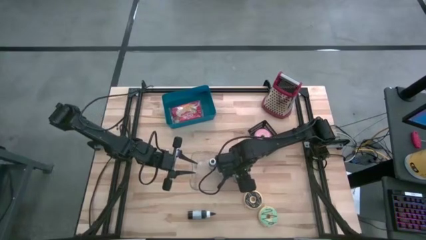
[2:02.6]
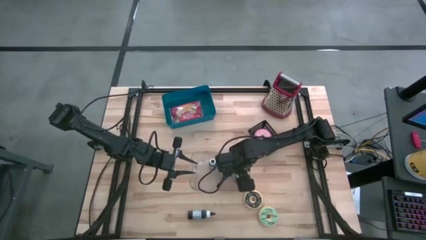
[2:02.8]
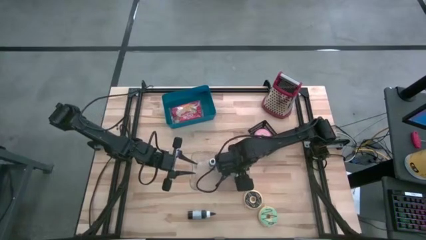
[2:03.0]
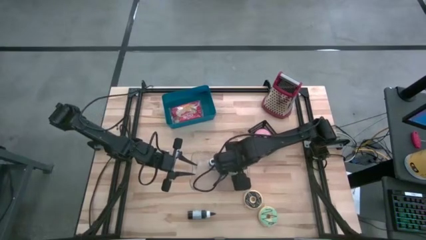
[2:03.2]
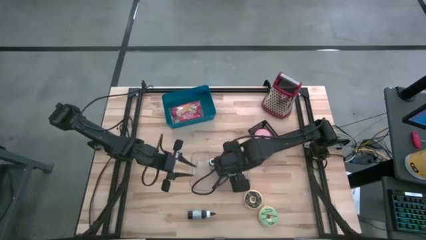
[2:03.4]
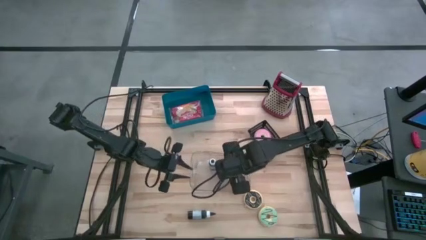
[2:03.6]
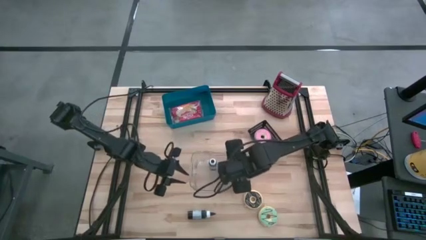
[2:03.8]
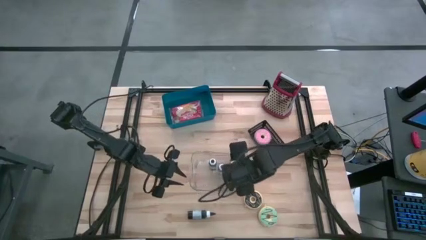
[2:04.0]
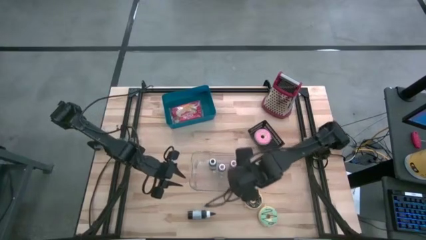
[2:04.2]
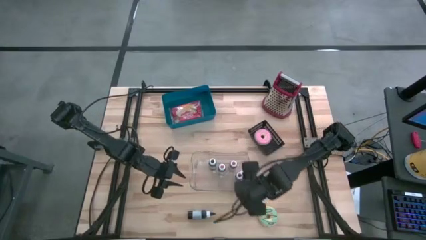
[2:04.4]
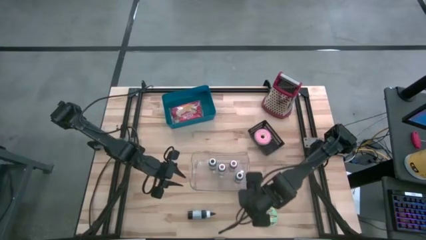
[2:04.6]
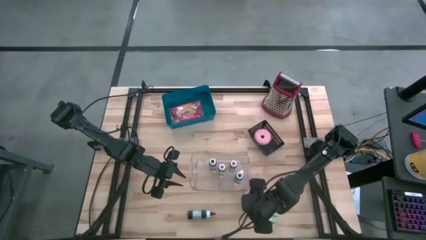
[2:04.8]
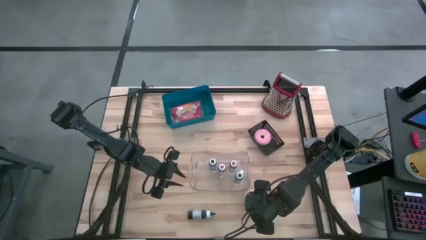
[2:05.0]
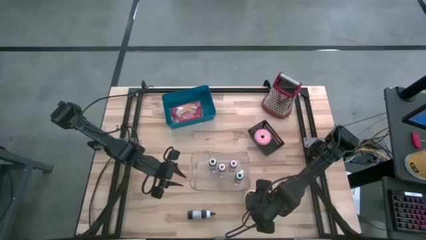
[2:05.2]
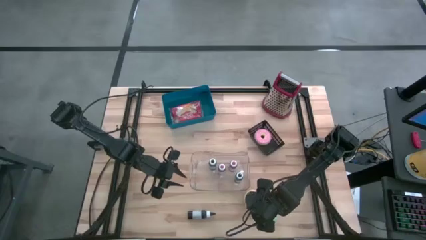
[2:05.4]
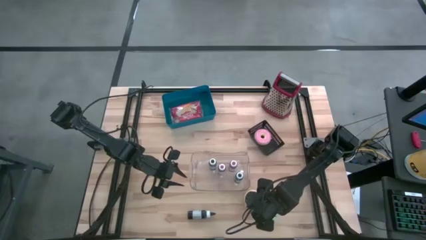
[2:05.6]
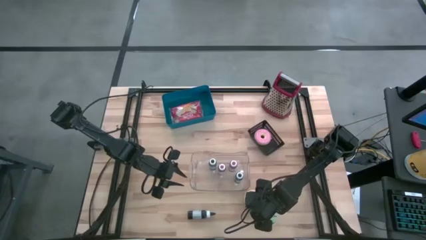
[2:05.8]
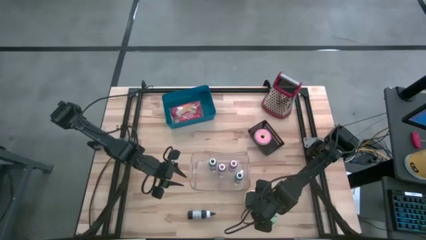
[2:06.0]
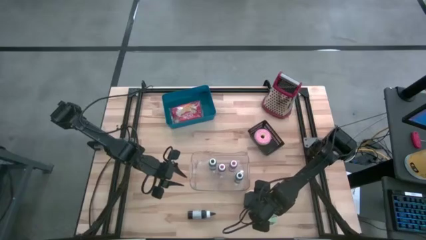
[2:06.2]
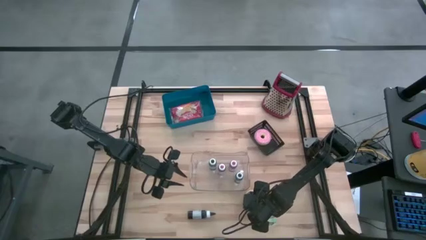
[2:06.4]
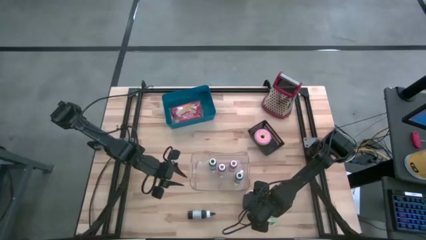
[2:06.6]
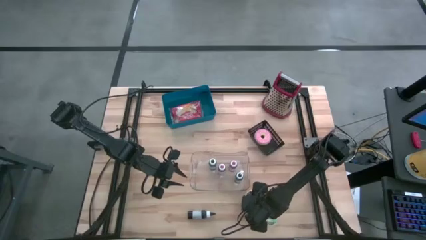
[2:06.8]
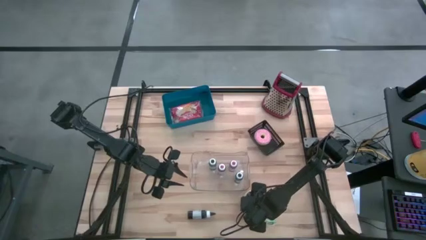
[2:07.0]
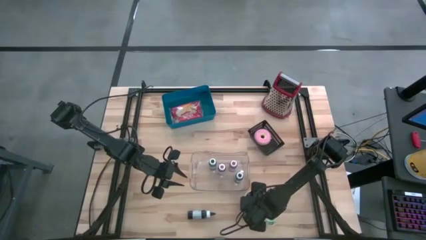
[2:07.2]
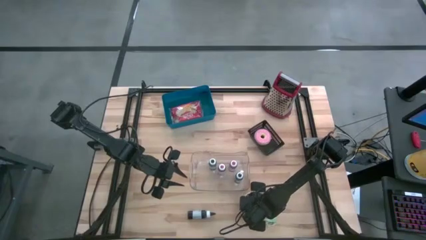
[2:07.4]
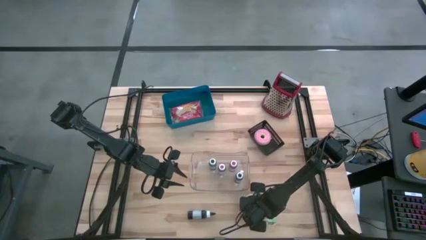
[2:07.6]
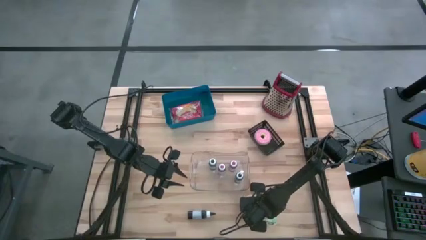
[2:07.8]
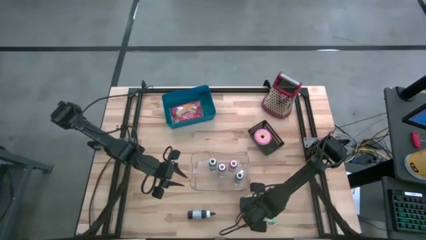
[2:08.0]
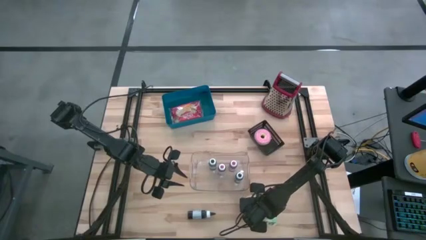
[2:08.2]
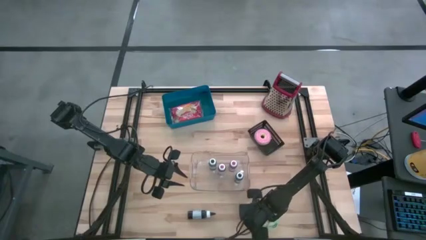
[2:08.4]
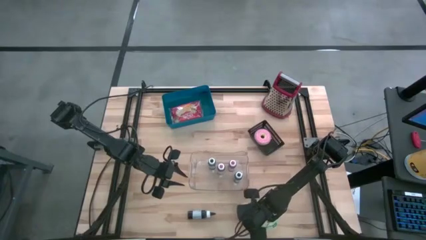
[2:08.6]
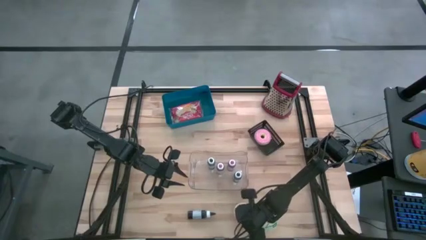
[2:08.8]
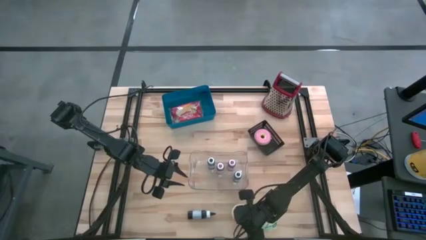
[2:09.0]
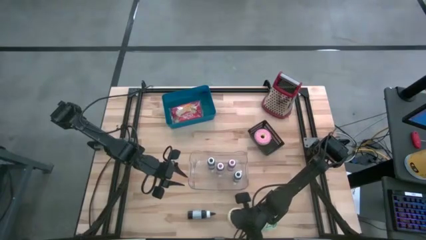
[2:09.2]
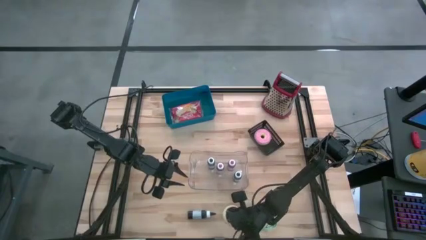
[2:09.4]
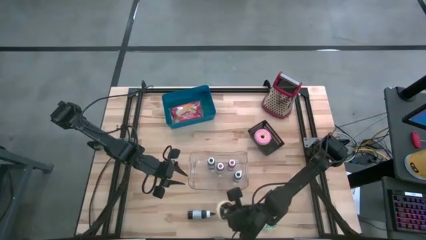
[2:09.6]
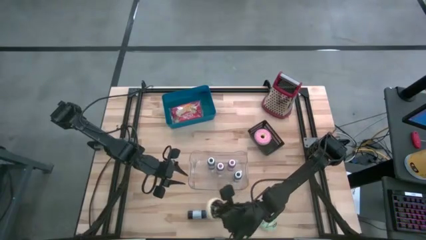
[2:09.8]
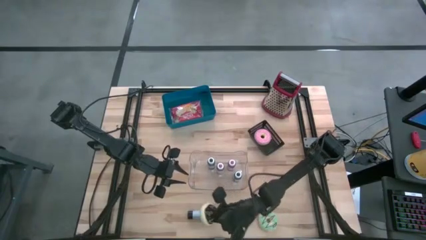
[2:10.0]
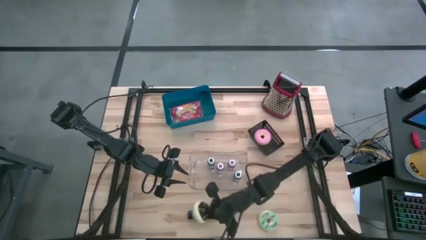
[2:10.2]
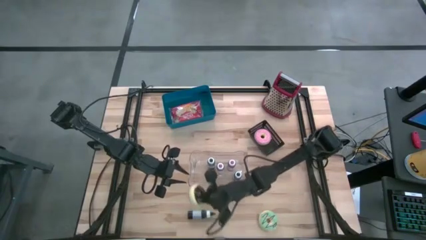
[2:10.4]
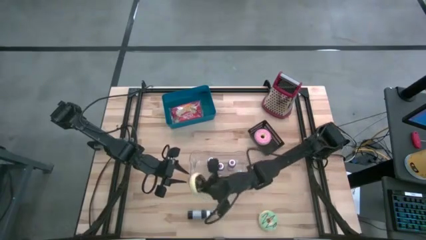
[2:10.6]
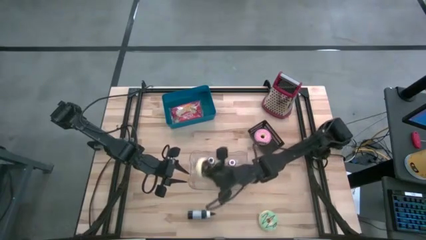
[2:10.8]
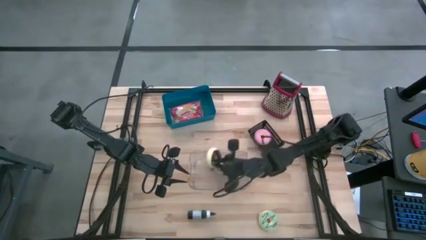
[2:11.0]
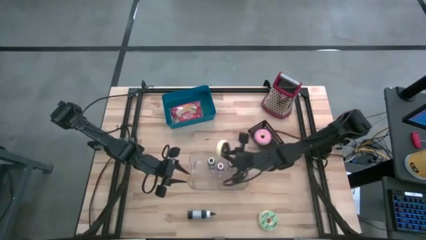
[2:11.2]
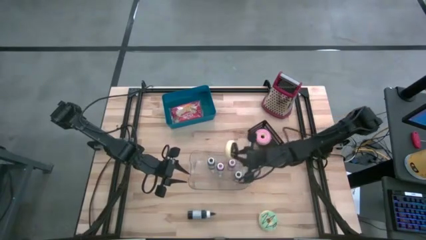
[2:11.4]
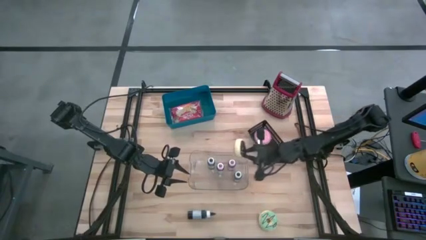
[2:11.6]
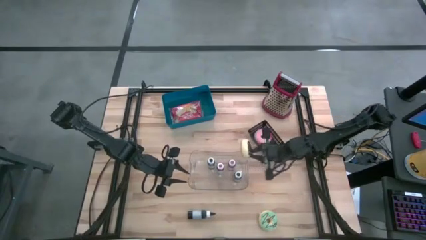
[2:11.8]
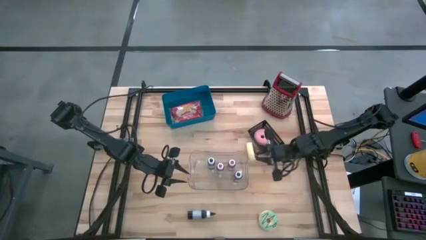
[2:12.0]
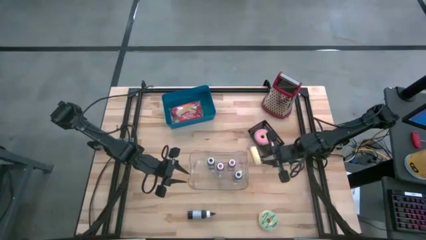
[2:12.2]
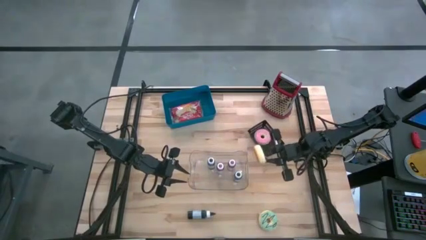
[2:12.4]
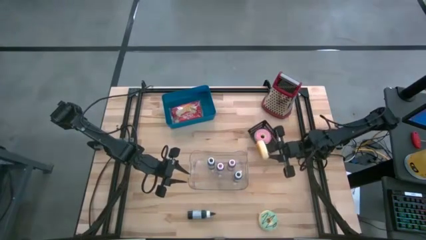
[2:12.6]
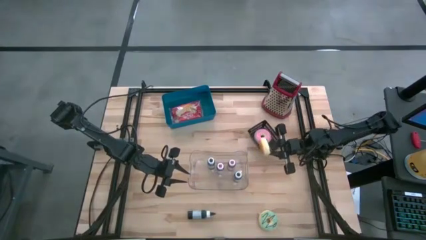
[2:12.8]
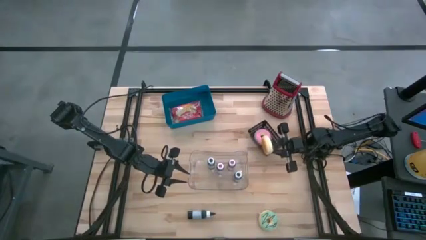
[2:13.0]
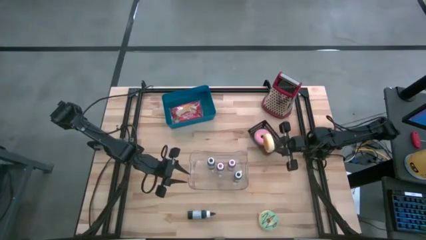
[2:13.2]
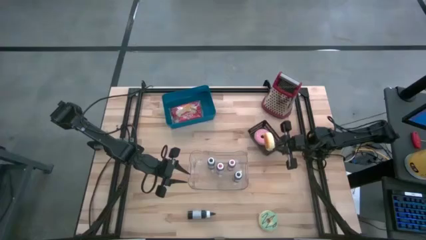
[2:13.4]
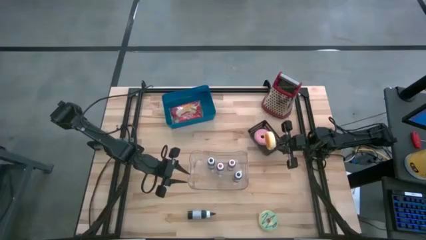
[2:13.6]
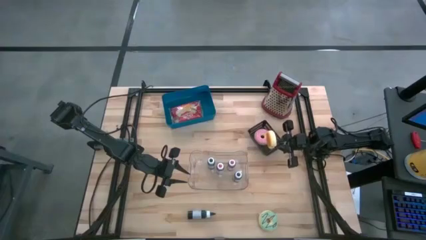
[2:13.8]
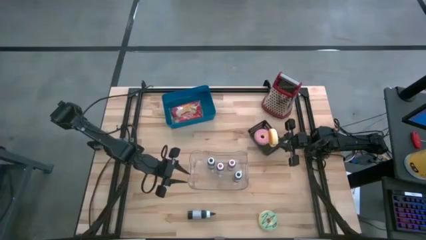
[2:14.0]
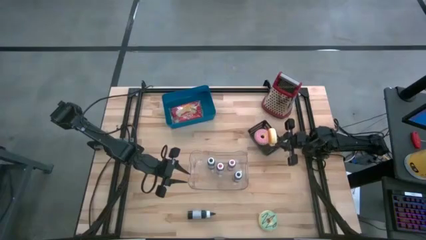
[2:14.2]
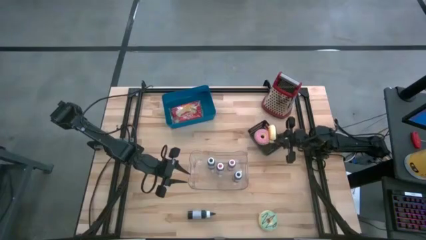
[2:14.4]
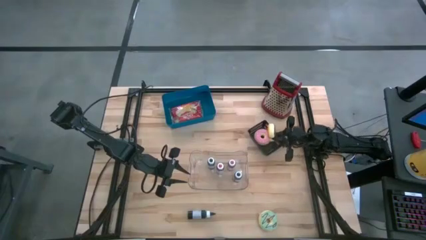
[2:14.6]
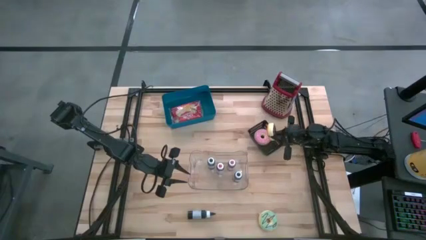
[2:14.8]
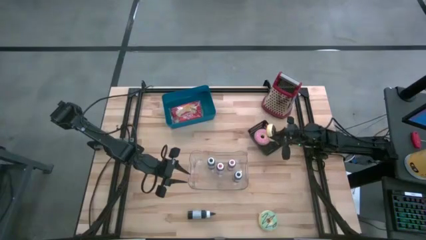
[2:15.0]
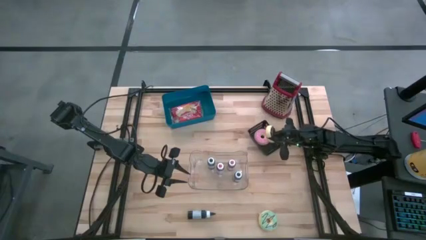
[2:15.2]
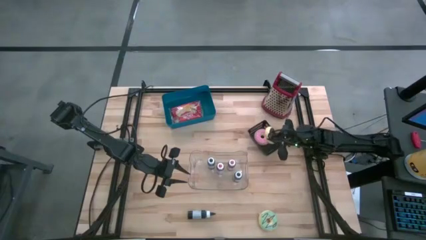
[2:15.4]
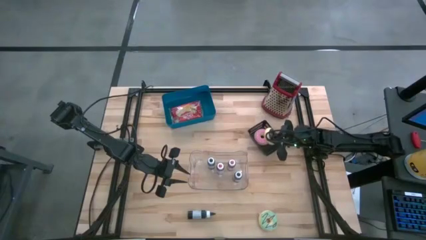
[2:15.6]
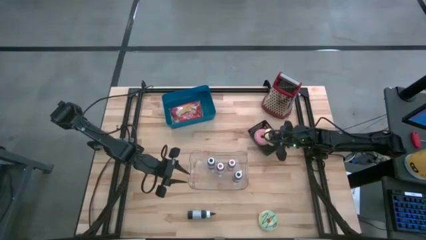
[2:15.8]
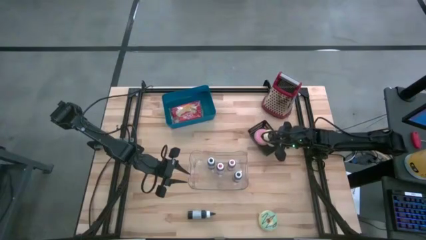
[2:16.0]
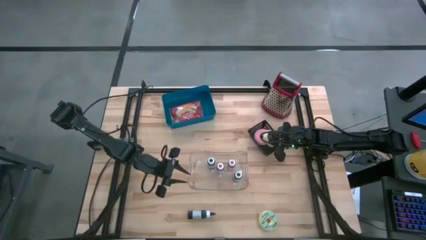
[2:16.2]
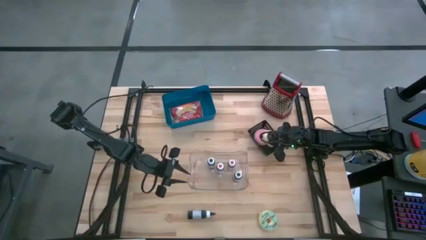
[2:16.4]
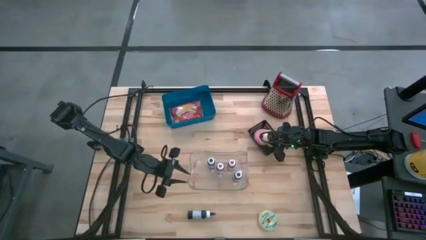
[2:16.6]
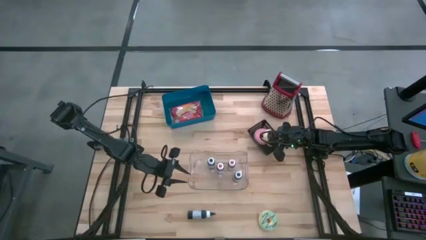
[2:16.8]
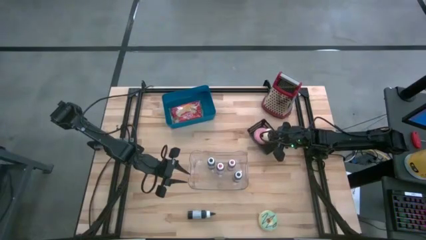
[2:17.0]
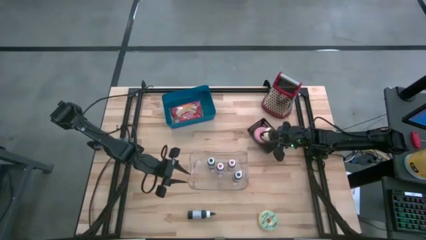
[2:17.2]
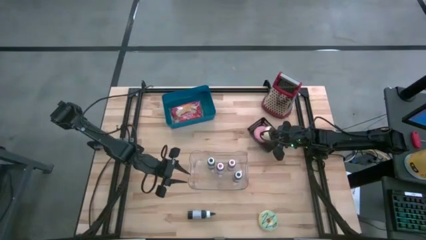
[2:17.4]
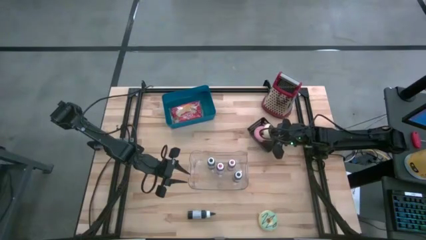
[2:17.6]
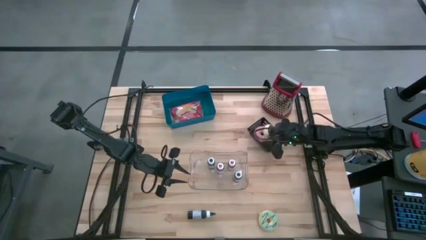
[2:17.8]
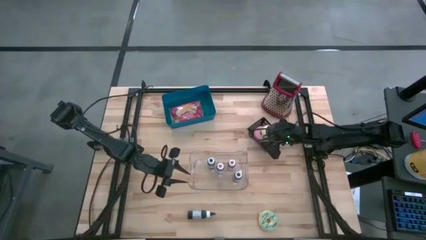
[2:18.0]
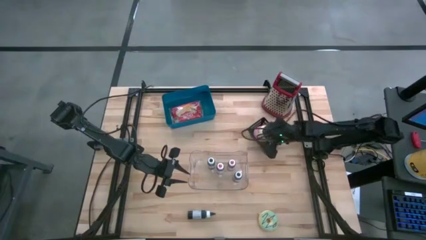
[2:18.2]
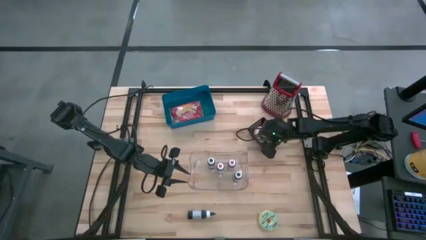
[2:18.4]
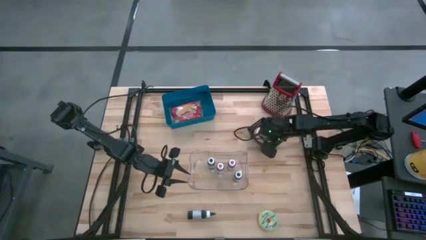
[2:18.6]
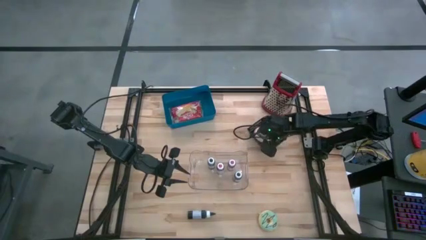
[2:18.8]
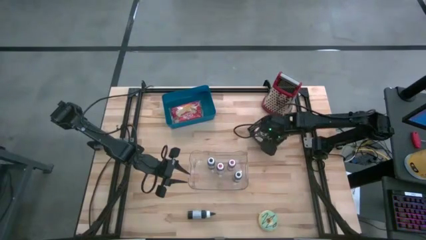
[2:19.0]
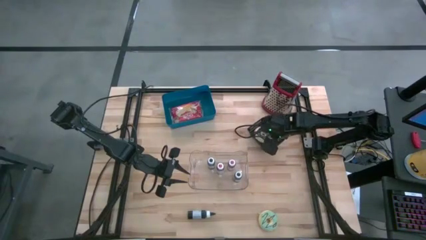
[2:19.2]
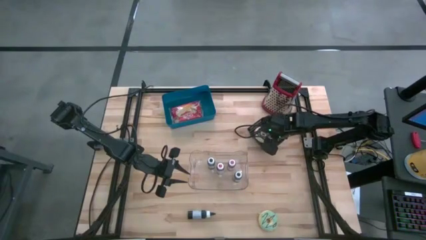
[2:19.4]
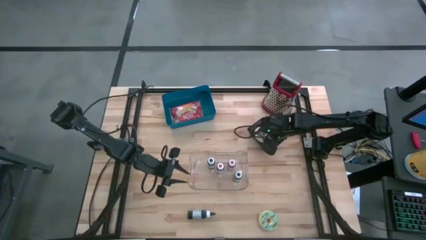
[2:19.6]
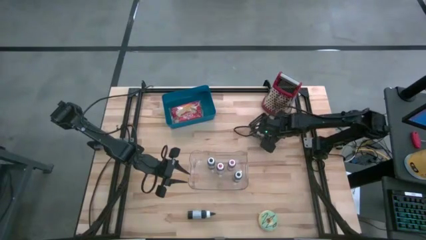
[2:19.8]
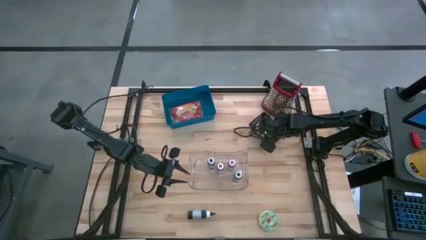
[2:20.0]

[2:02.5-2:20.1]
Put the black donut into the black bin
